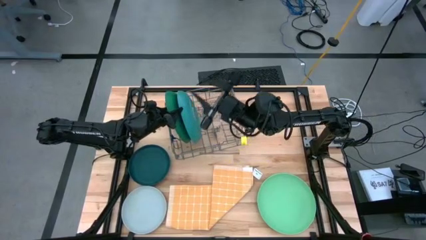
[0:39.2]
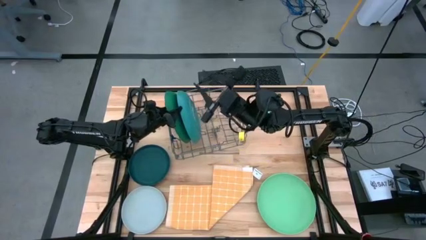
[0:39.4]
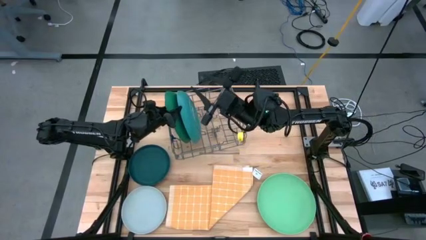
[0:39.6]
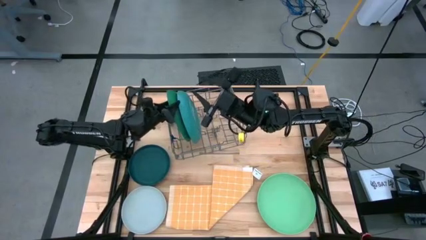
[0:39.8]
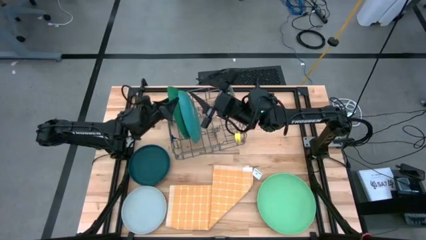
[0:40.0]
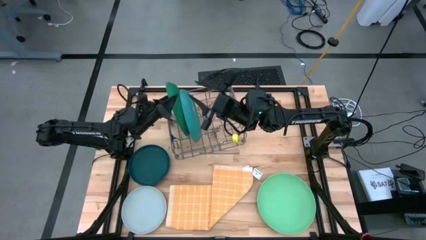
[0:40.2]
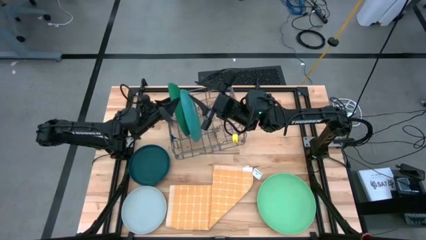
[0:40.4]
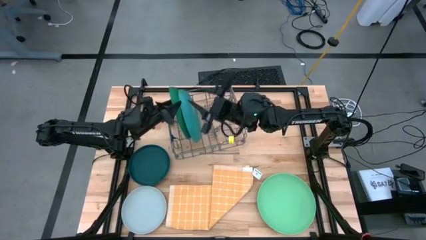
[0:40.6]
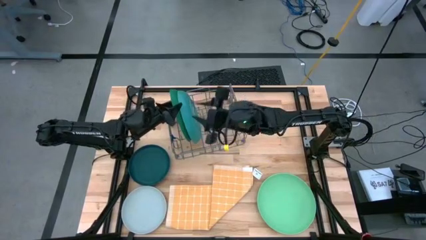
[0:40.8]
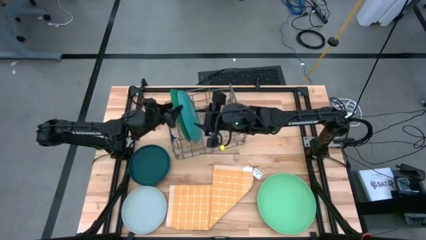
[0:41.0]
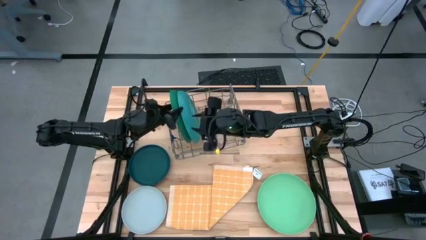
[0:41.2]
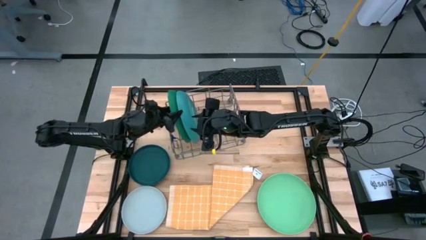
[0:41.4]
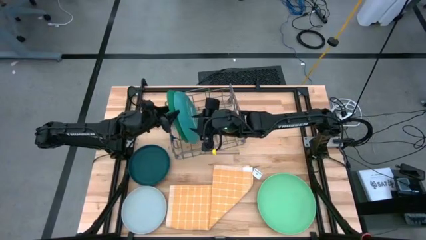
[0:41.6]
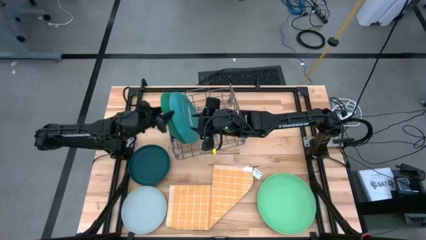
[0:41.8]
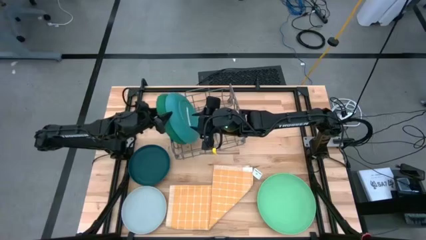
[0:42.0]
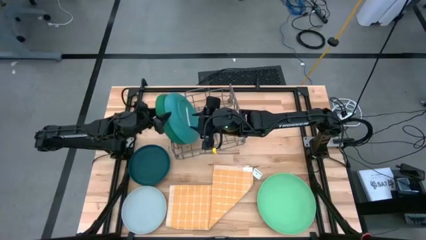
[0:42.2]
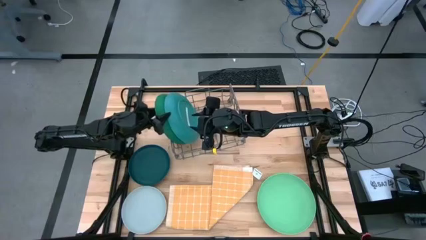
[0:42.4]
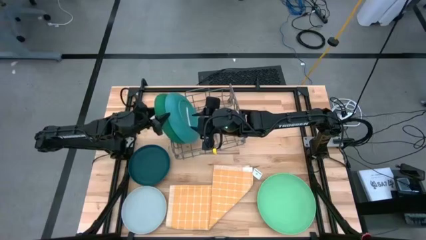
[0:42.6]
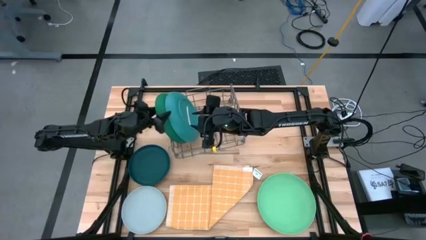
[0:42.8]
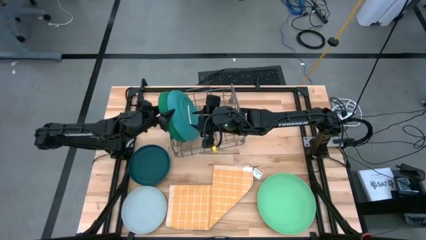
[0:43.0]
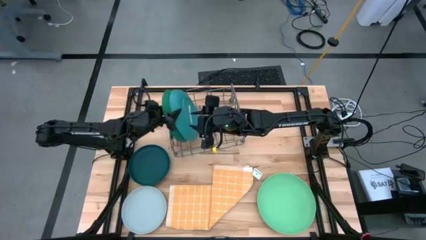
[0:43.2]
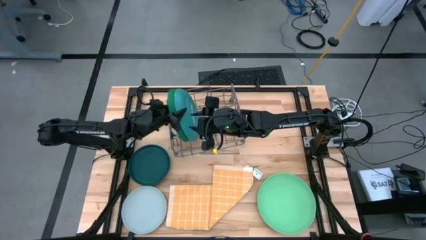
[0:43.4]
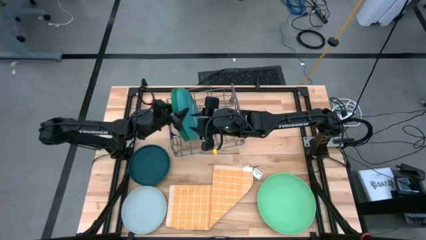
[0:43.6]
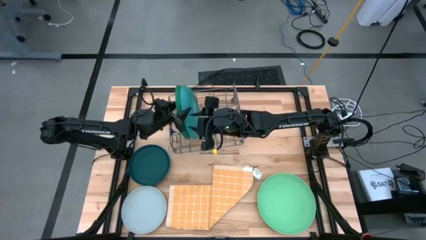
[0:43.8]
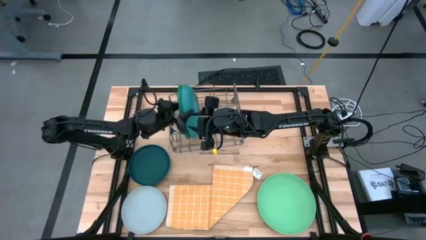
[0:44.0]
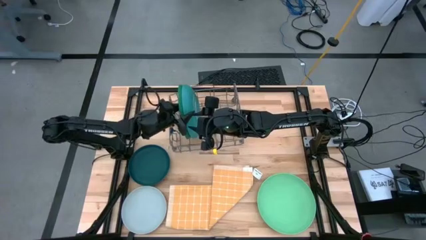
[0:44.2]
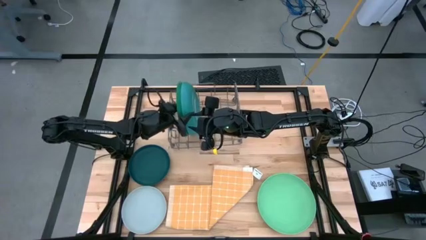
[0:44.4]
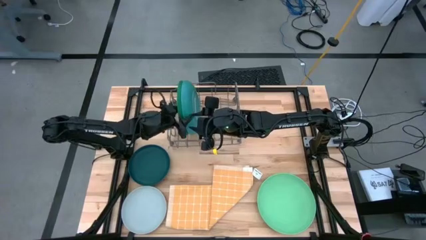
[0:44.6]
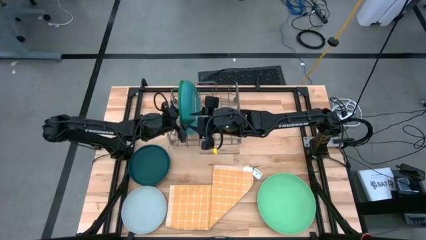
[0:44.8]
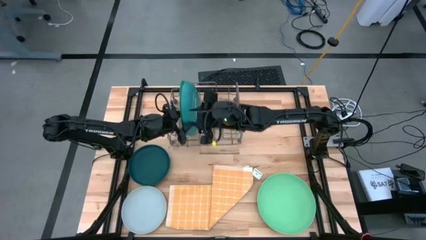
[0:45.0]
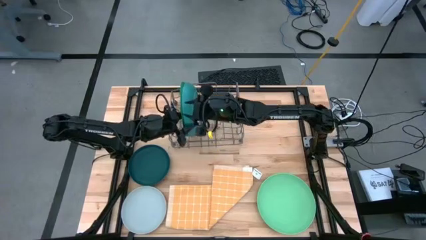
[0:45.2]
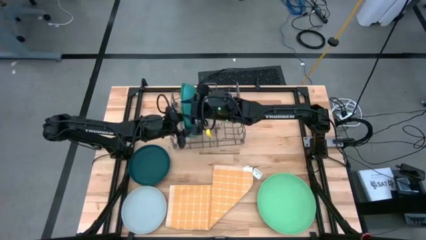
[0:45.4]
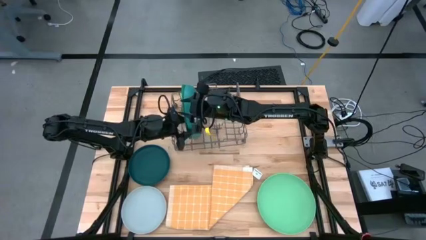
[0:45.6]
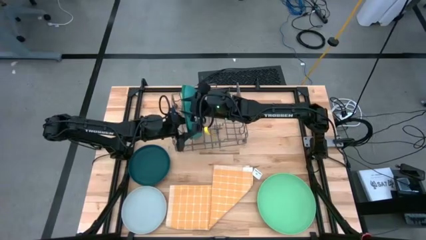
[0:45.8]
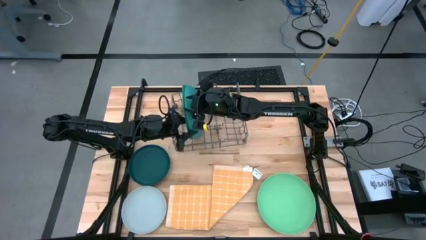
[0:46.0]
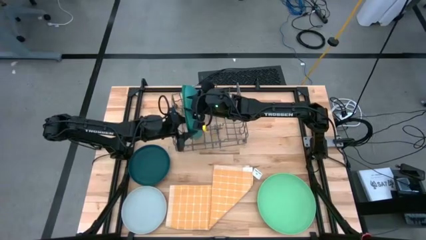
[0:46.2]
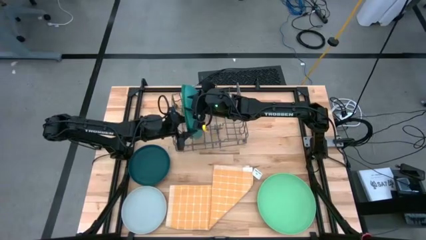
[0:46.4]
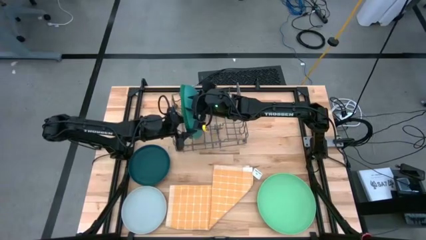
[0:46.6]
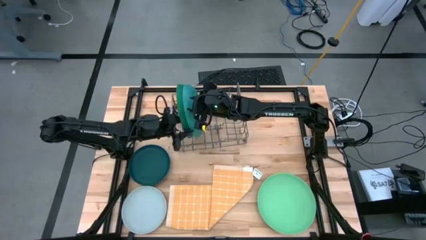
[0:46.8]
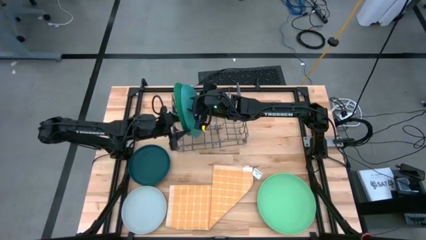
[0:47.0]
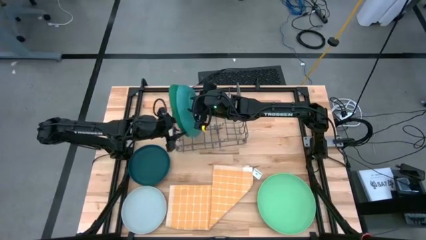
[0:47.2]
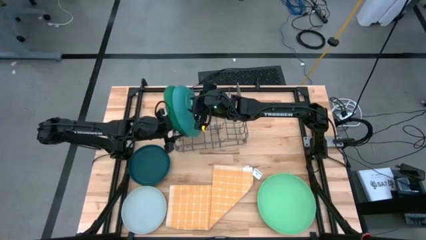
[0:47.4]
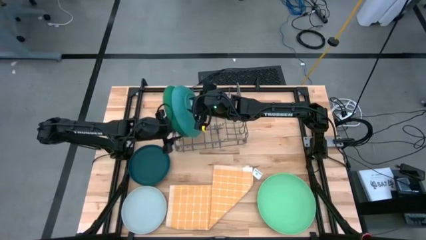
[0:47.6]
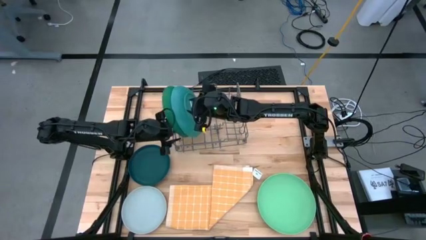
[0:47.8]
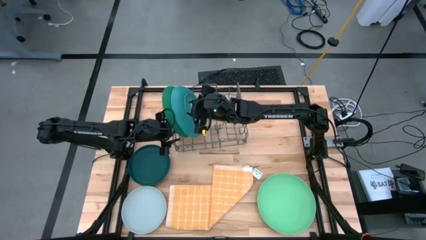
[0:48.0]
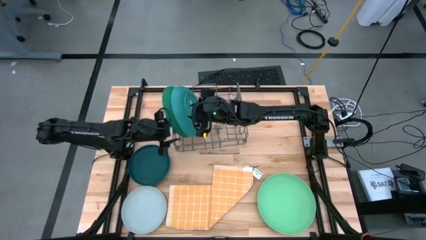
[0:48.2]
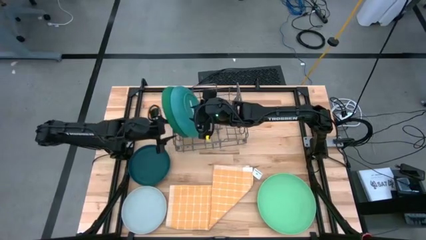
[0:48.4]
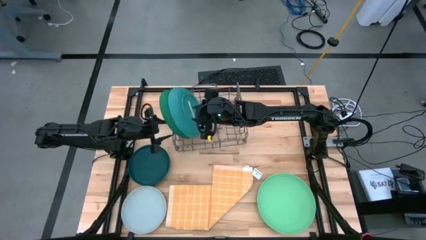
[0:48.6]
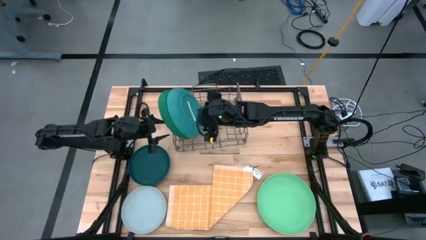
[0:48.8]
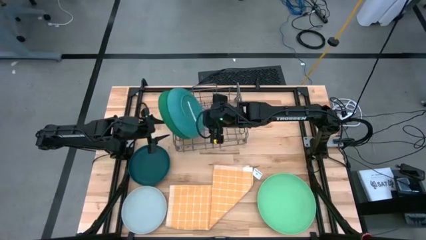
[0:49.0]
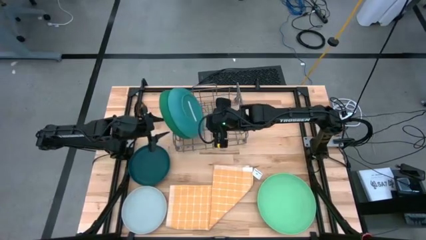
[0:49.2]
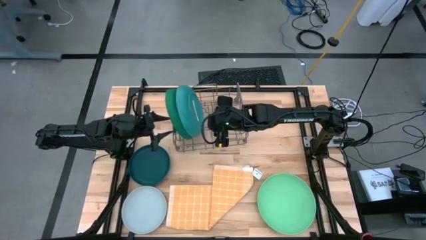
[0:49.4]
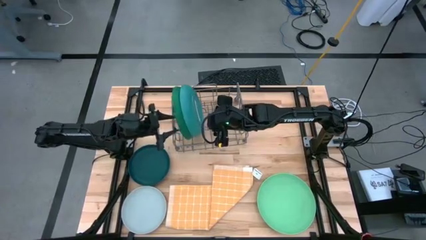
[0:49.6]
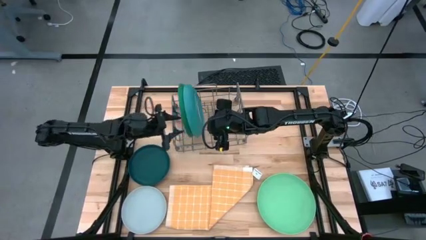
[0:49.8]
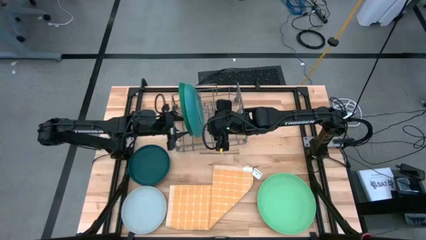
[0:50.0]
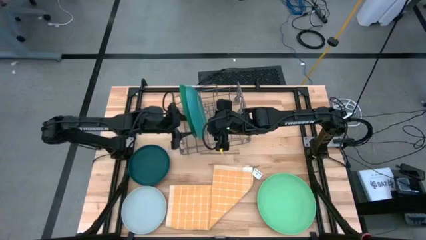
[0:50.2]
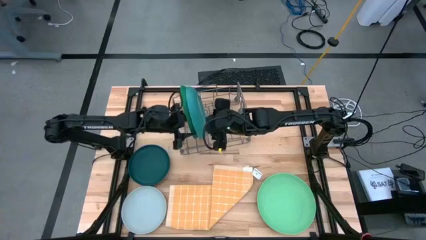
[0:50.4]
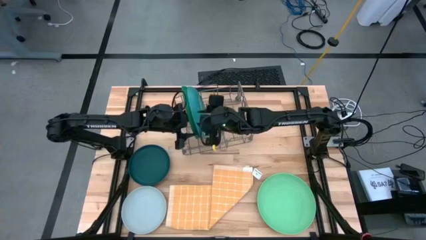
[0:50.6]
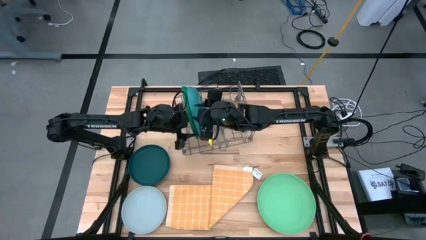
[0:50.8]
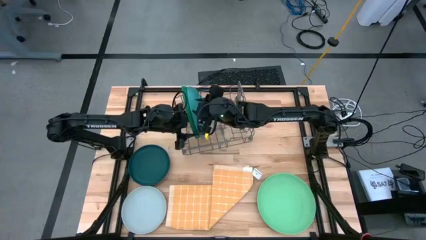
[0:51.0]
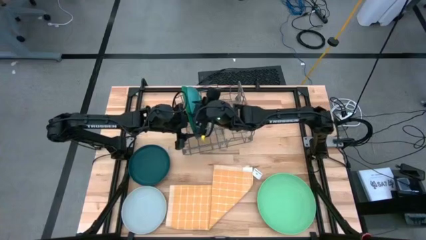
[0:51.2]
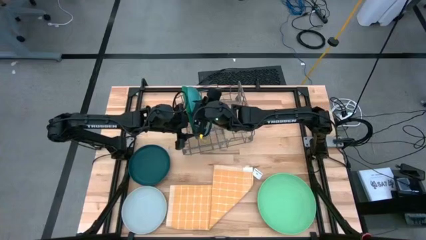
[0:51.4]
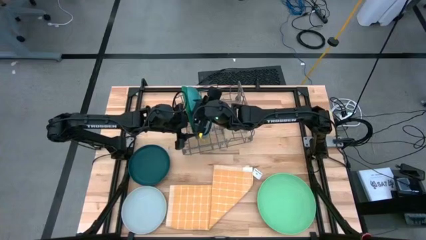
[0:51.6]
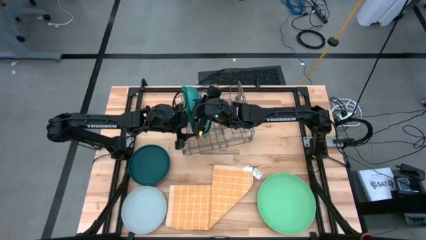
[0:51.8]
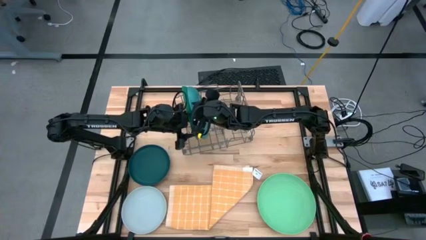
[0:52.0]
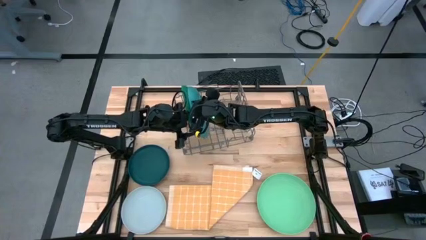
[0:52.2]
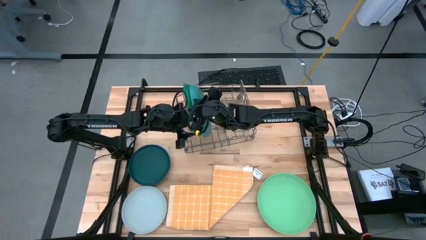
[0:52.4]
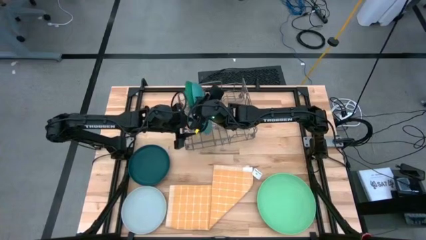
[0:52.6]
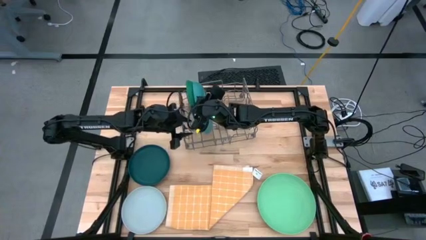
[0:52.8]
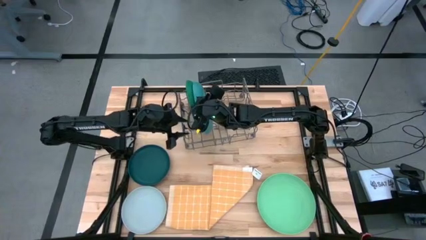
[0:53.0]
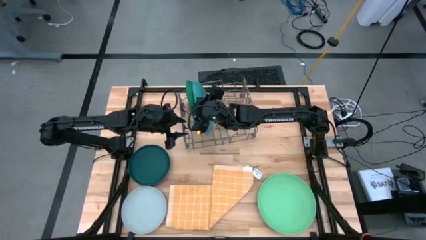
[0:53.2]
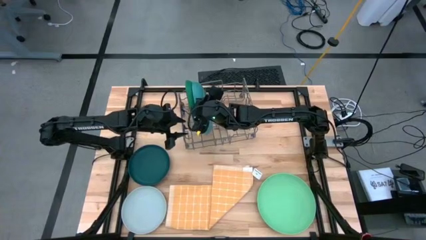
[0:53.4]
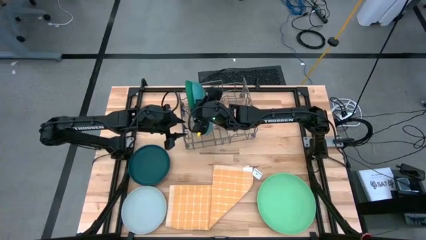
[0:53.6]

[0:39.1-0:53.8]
Task: Sort dishes
Put the green plate on the dish rack

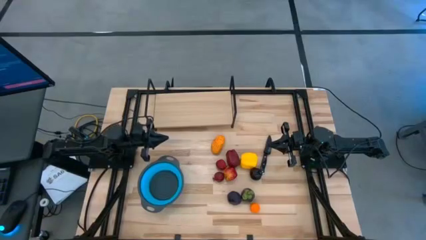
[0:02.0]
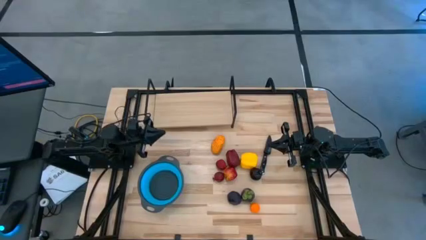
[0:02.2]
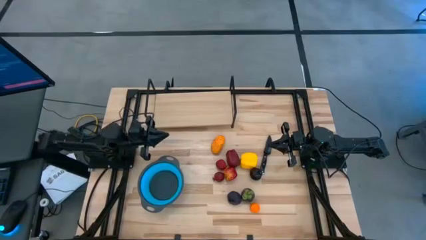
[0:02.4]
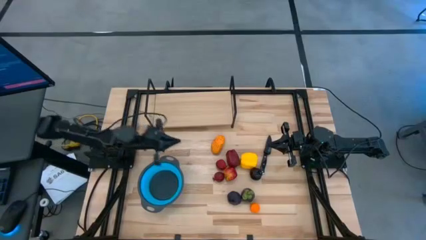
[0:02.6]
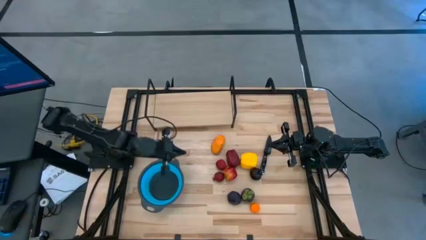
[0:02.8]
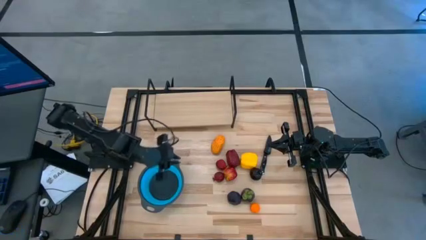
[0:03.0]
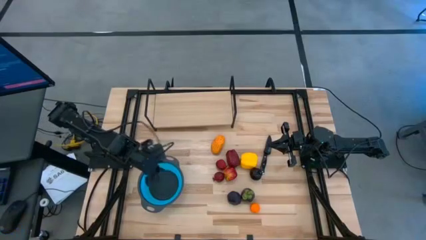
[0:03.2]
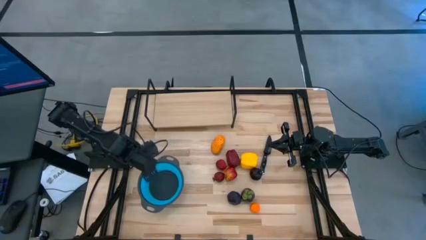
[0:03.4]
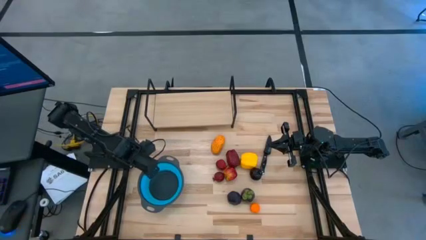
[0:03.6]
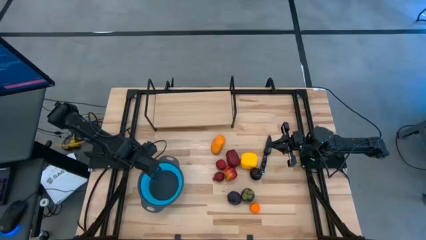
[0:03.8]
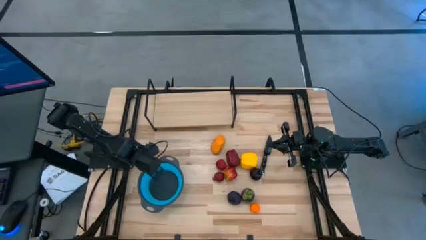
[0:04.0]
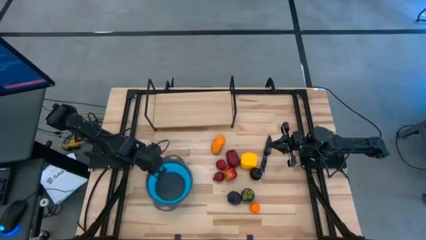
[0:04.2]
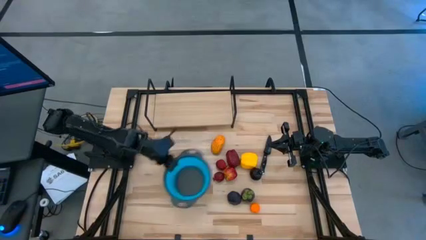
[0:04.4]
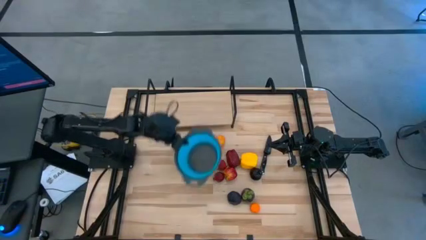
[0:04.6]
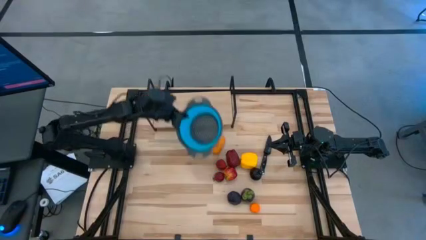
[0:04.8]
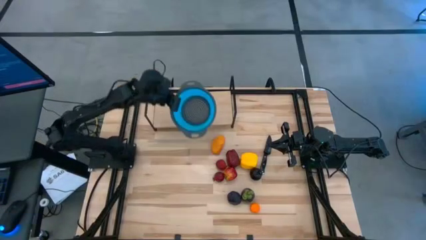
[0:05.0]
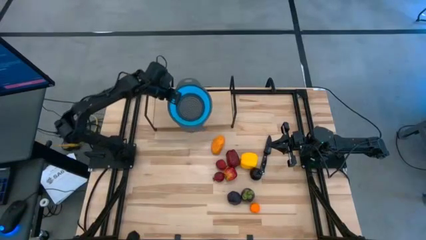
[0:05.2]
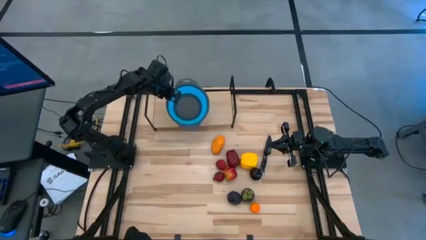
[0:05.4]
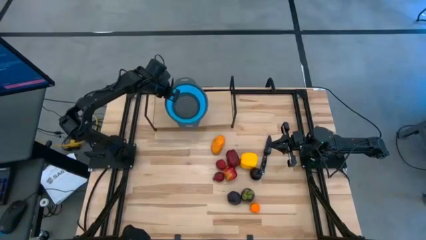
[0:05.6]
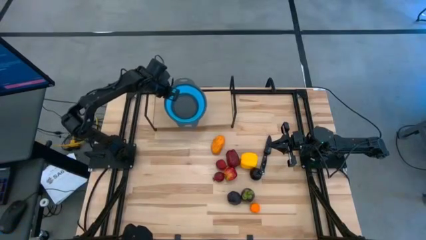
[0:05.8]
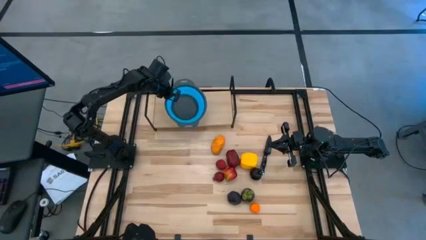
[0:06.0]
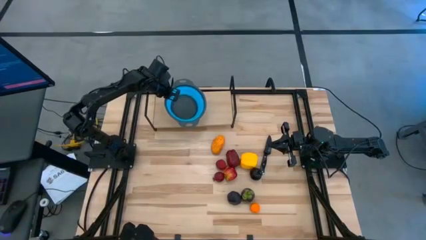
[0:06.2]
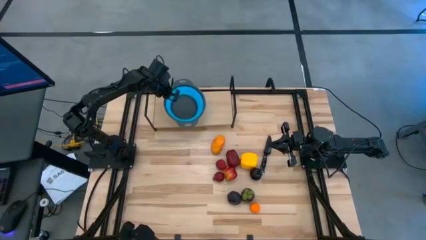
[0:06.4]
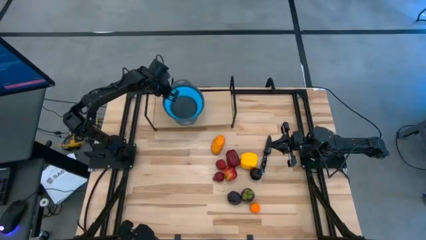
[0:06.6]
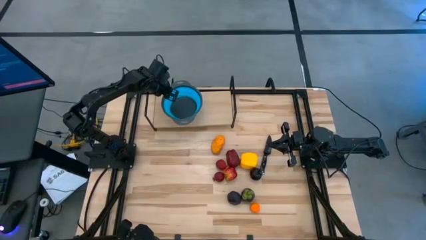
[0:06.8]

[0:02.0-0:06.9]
Task: Pick & Place Fruit
Put the blue strainer bowl on the shelf
